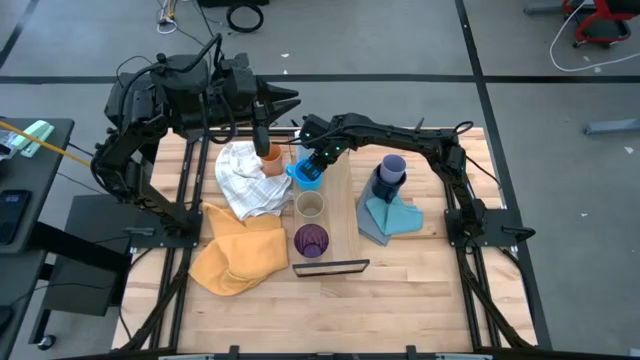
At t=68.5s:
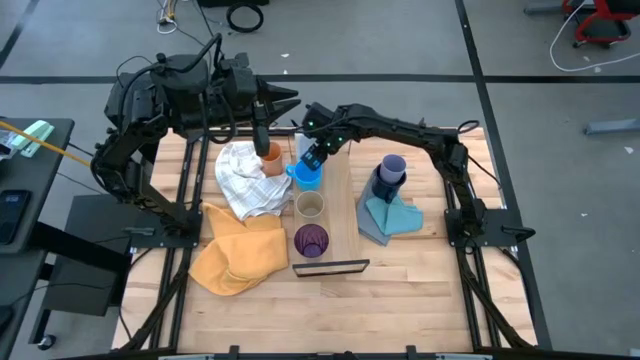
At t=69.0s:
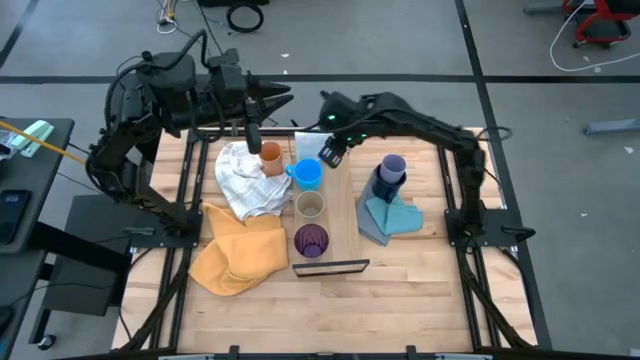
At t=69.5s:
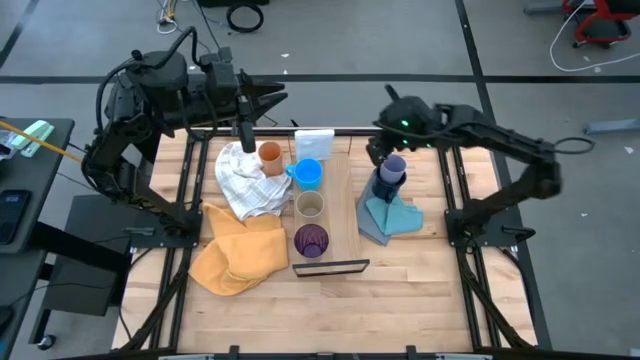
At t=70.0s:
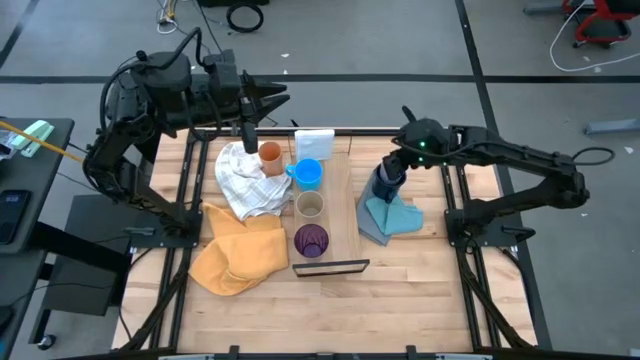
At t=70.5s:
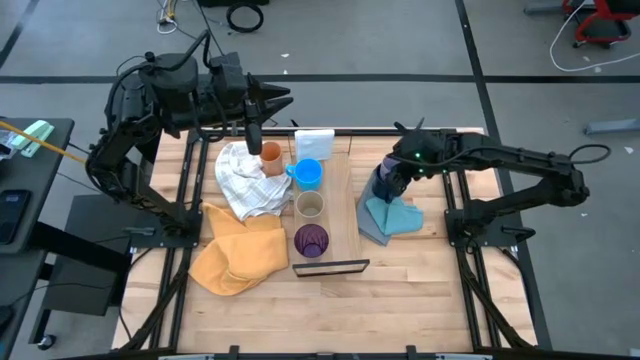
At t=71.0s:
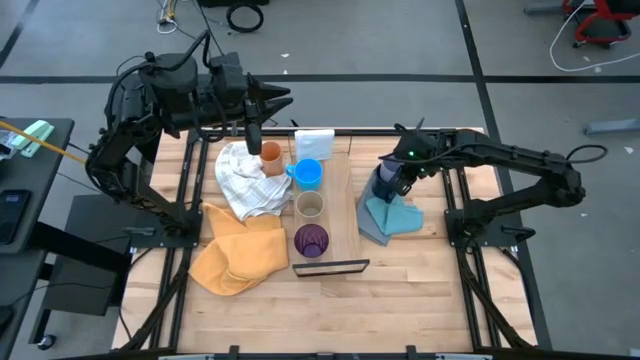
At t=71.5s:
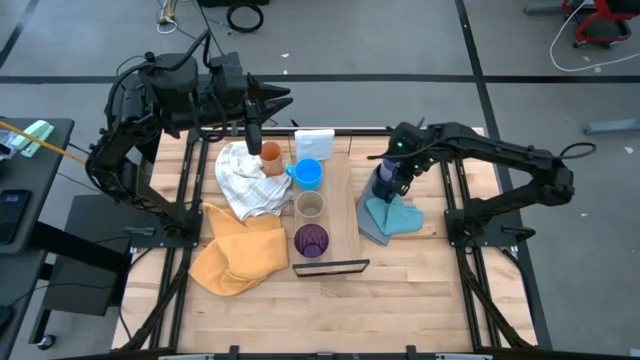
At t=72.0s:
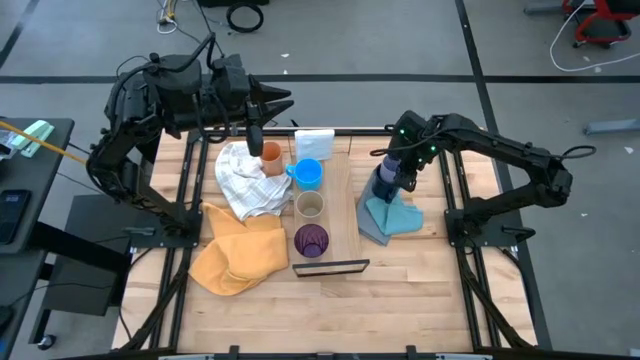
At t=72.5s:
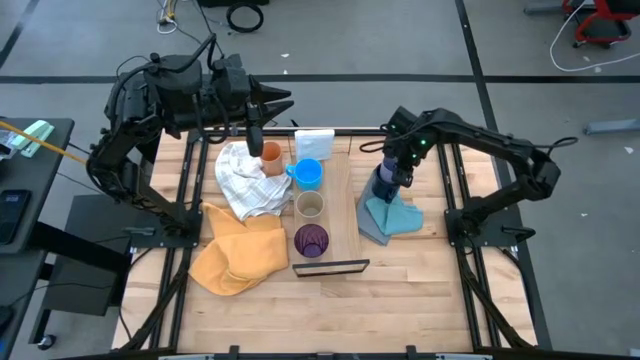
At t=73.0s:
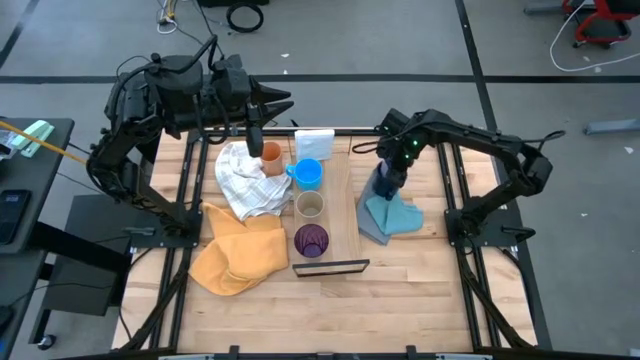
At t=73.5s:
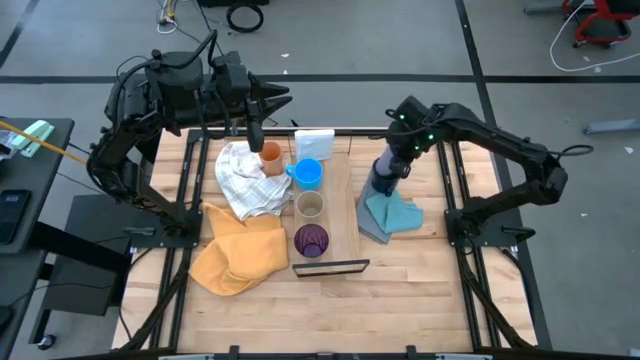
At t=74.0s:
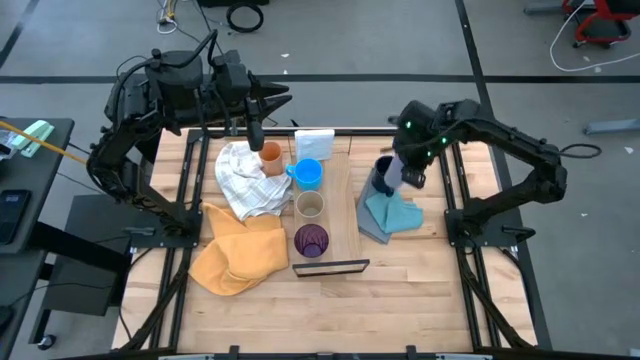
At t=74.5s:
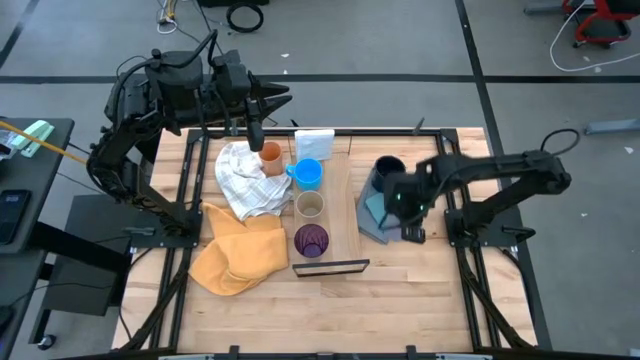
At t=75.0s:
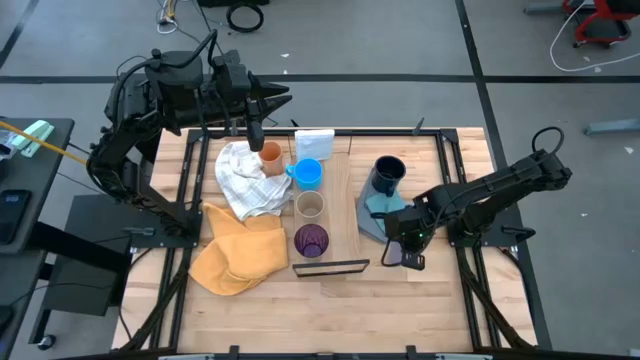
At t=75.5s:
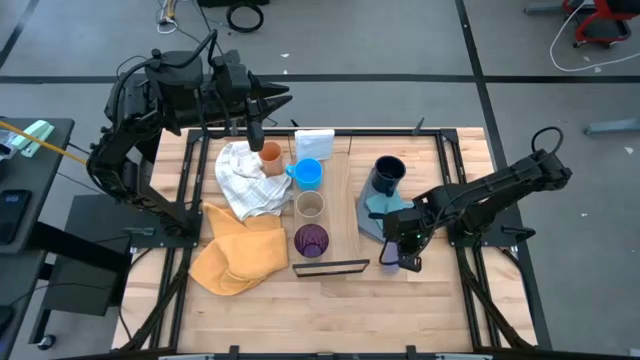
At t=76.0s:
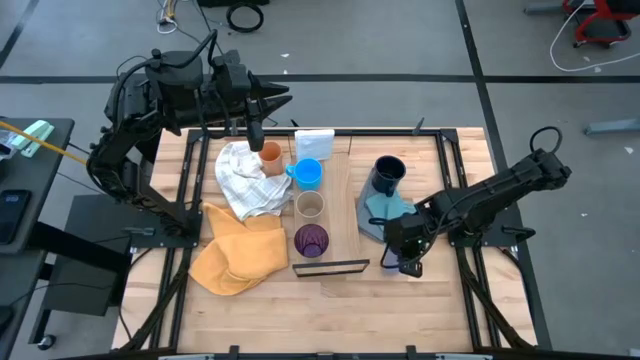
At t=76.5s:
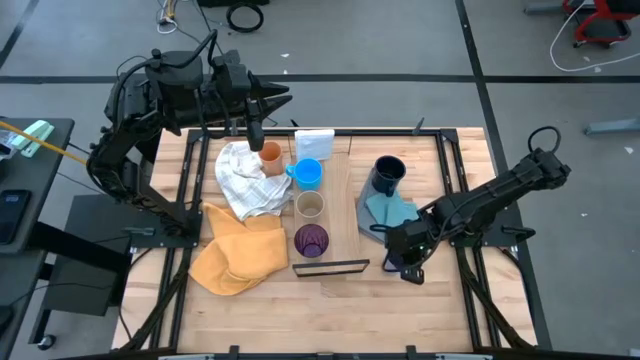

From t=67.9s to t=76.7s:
Task: Stack small to large cups/mugs on shelf
Move the purple cup to the bottom right of the table

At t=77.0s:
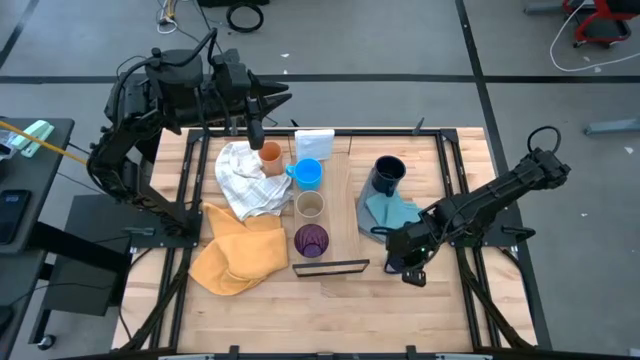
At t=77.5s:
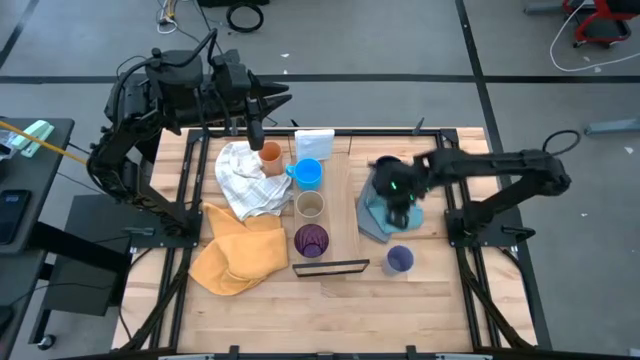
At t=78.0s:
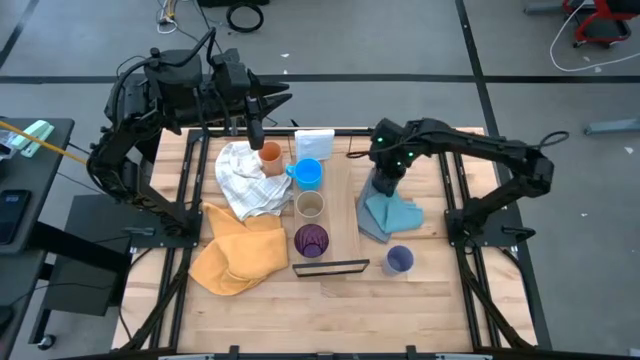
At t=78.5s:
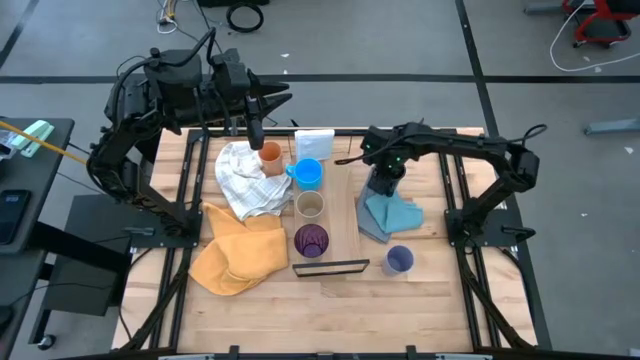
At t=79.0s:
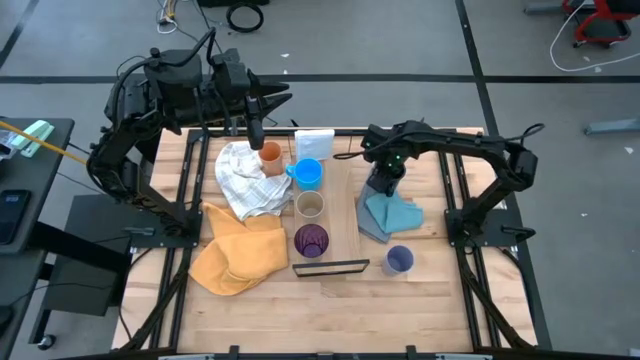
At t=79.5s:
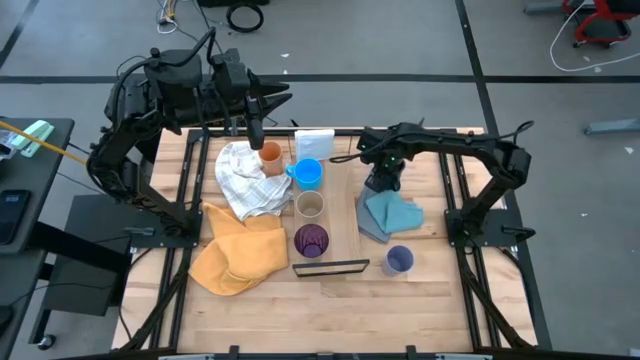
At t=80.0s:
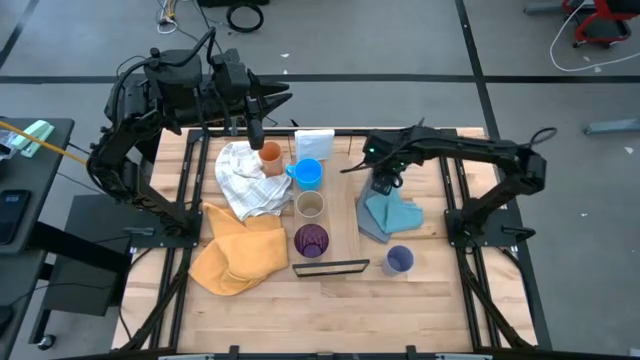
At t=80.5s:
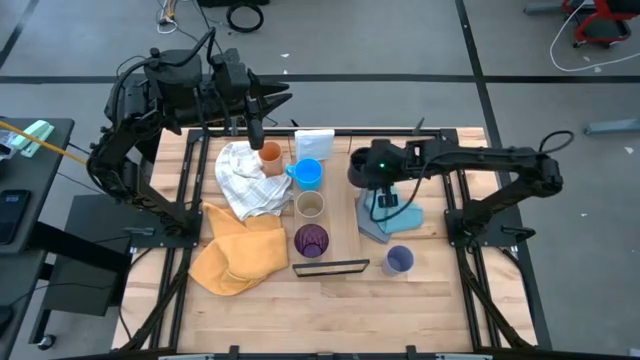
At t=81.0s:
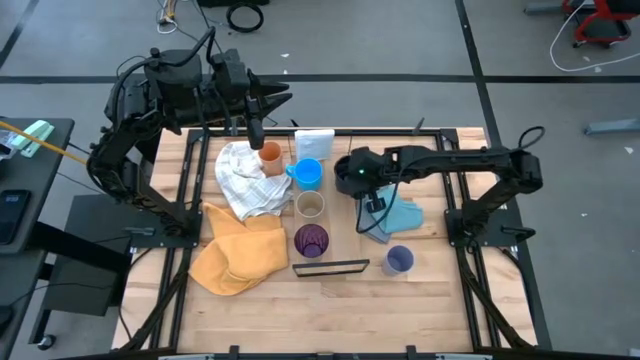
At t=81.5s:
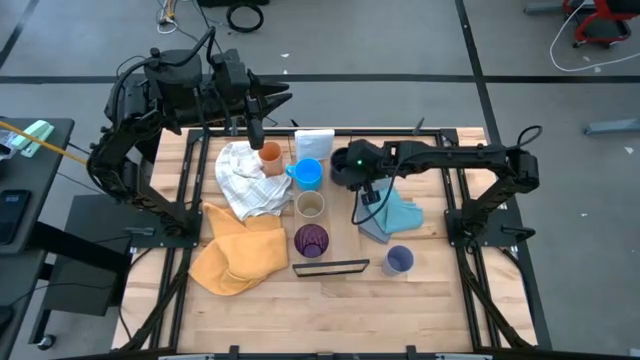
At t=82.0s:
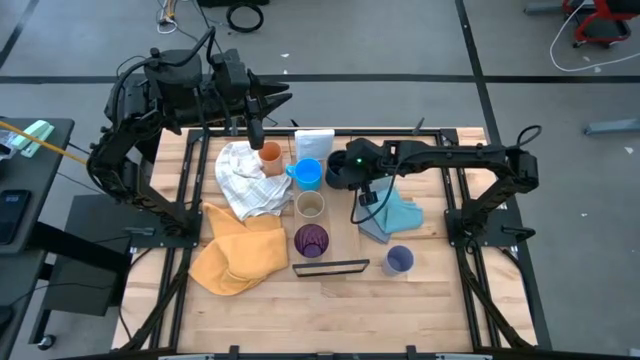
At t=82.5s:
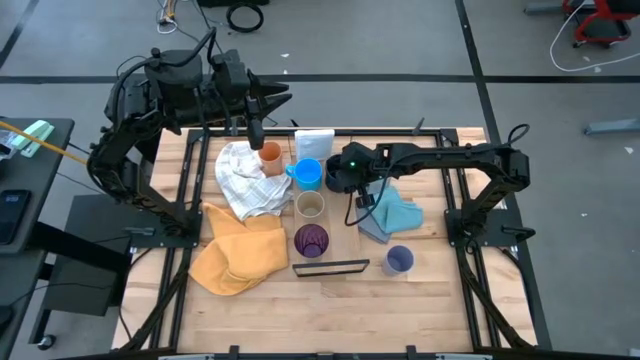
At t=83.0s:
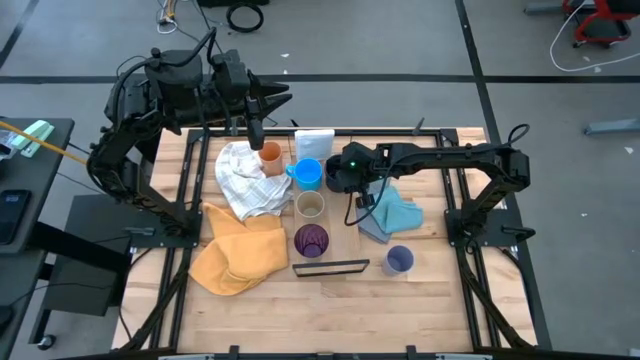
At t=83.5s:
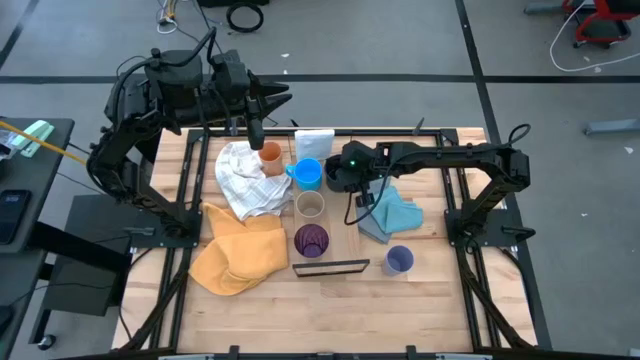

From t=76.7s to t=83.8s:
Put the dark blue mug on the shelf
